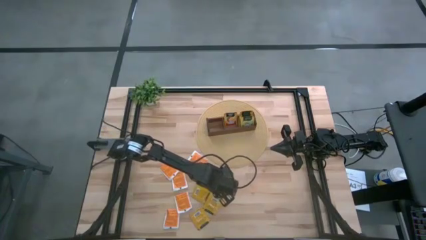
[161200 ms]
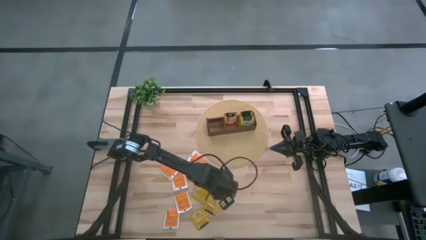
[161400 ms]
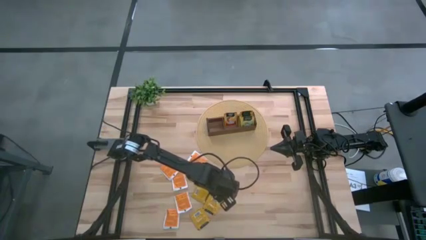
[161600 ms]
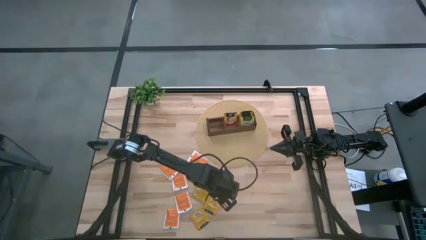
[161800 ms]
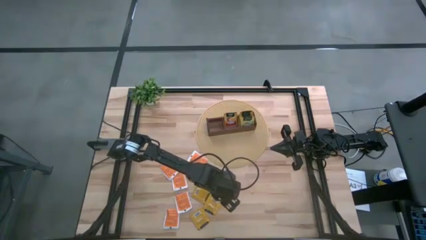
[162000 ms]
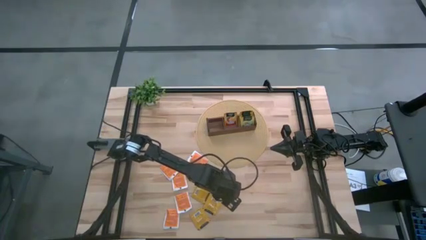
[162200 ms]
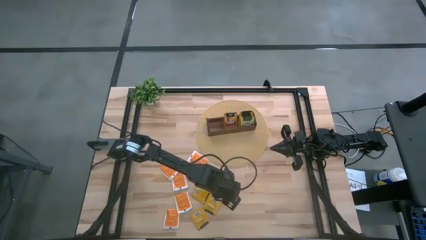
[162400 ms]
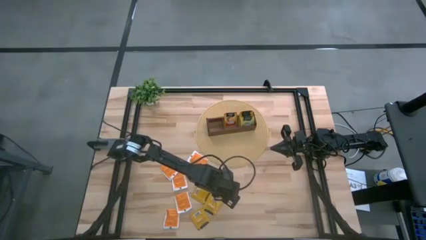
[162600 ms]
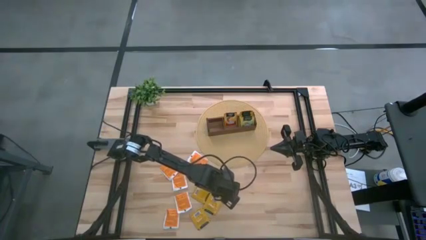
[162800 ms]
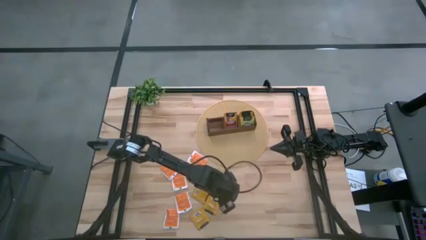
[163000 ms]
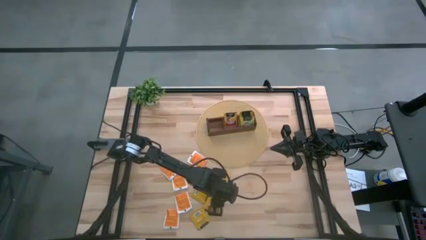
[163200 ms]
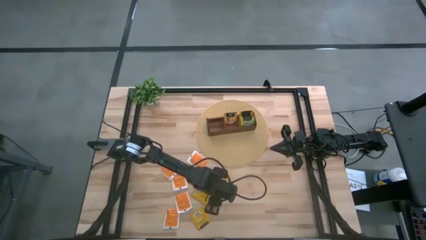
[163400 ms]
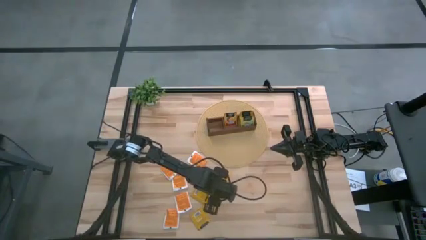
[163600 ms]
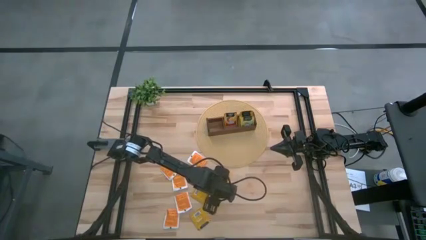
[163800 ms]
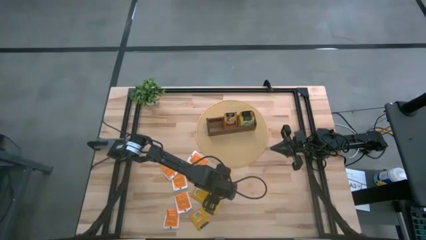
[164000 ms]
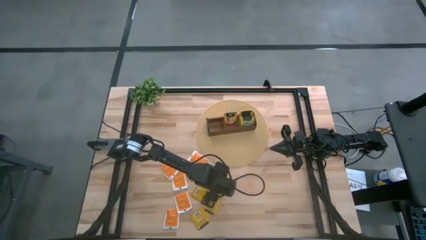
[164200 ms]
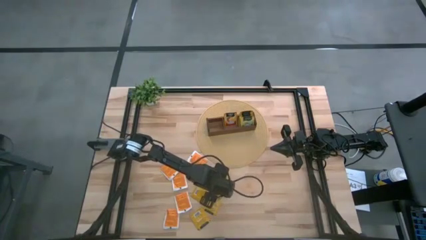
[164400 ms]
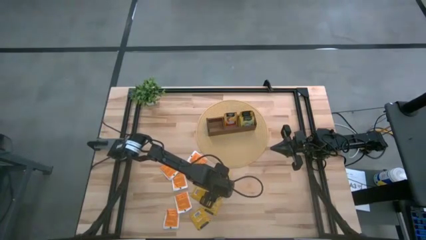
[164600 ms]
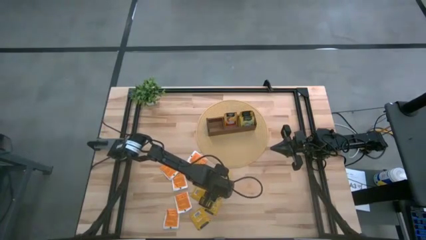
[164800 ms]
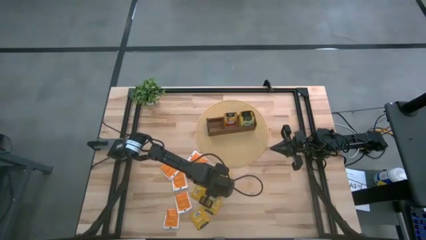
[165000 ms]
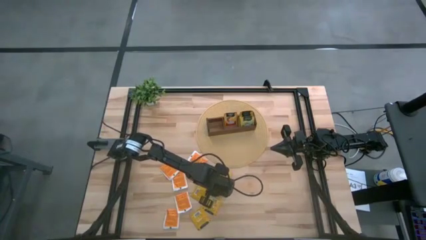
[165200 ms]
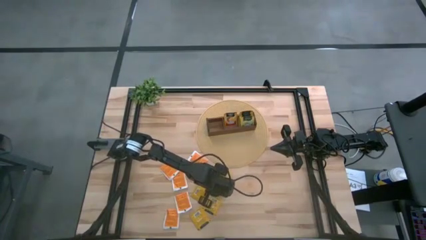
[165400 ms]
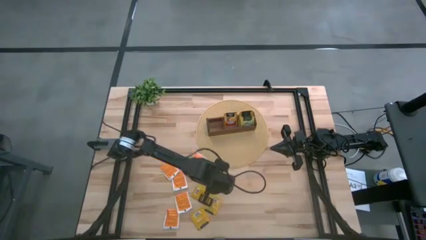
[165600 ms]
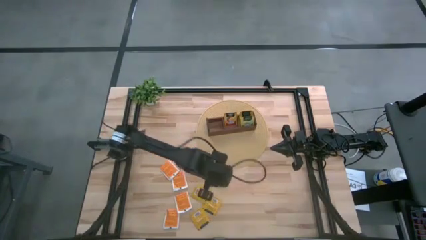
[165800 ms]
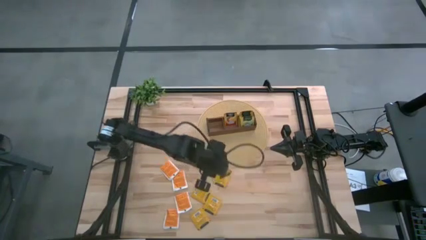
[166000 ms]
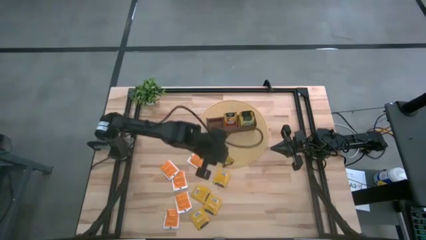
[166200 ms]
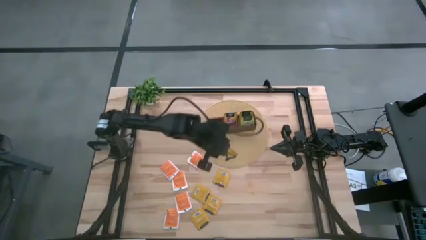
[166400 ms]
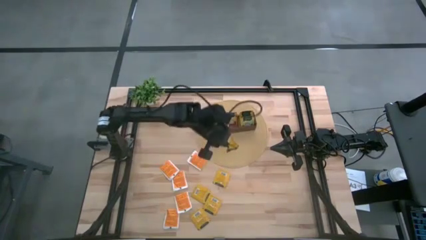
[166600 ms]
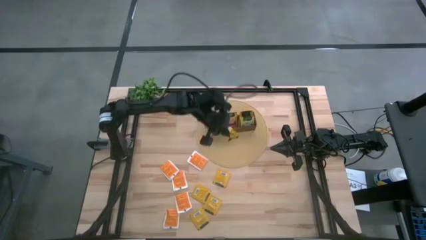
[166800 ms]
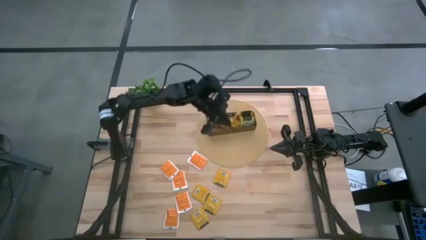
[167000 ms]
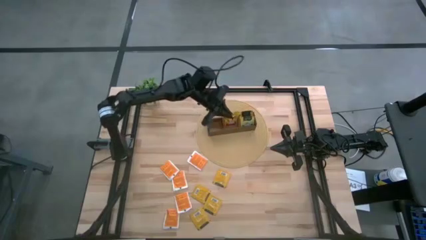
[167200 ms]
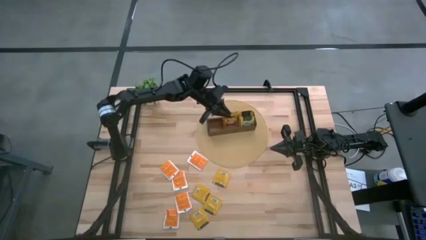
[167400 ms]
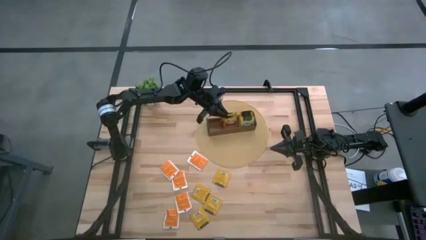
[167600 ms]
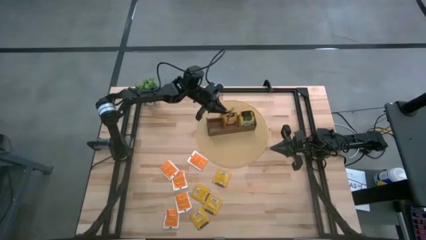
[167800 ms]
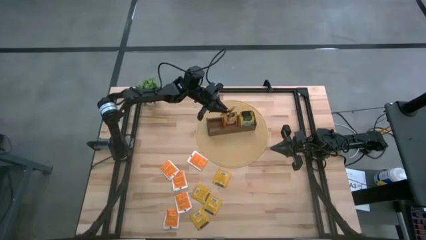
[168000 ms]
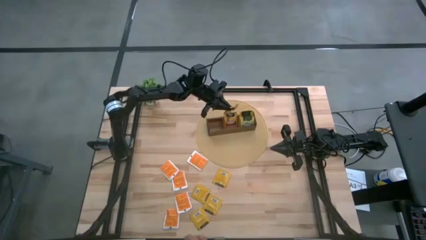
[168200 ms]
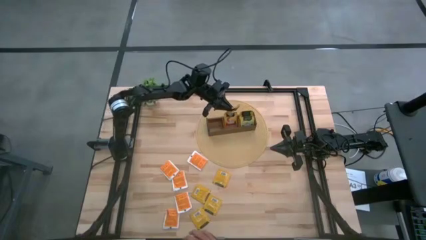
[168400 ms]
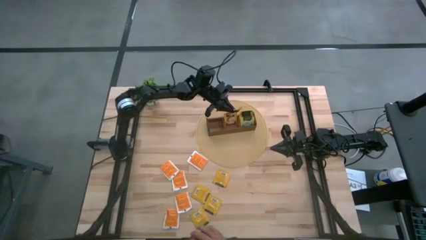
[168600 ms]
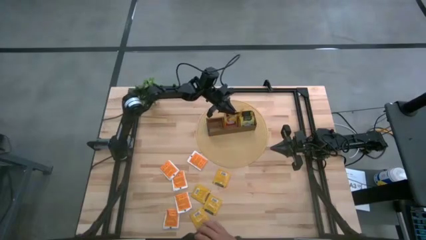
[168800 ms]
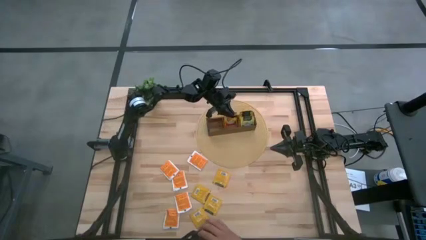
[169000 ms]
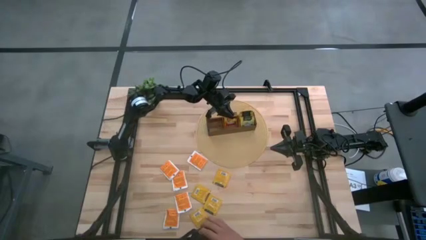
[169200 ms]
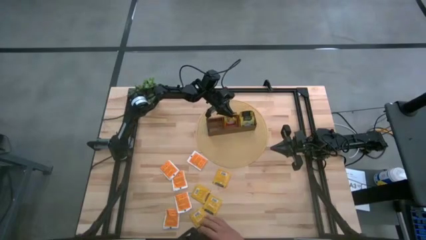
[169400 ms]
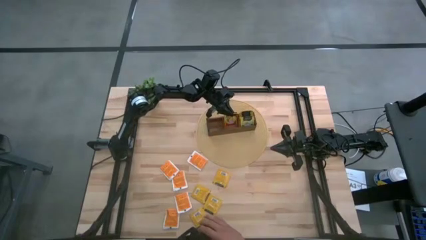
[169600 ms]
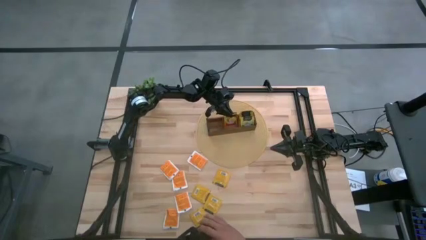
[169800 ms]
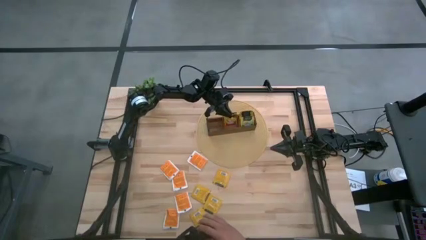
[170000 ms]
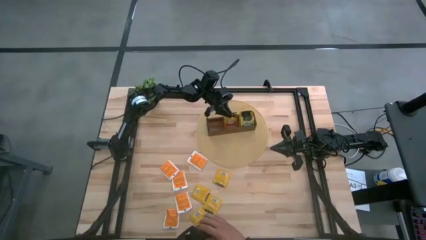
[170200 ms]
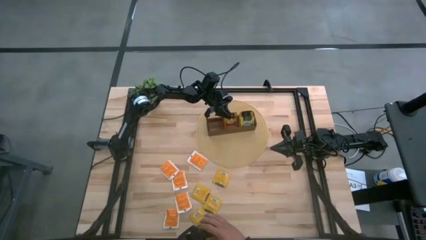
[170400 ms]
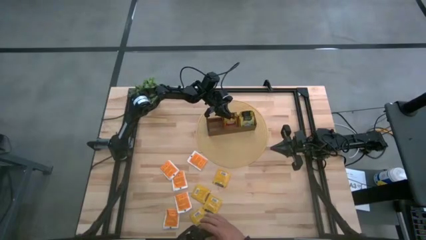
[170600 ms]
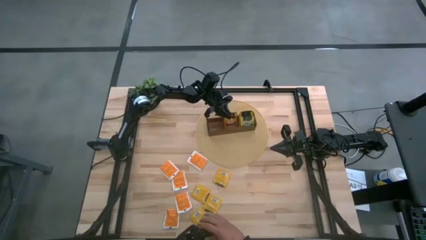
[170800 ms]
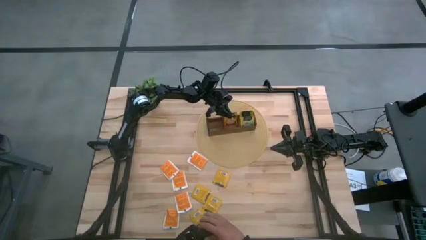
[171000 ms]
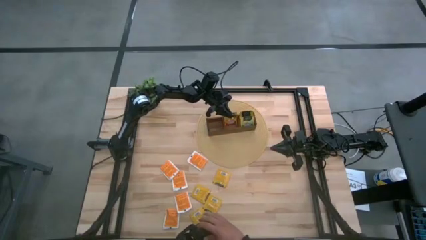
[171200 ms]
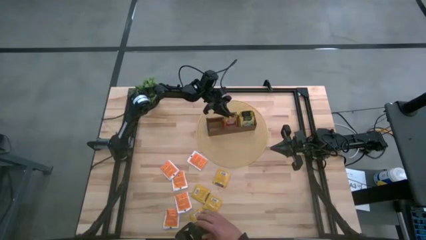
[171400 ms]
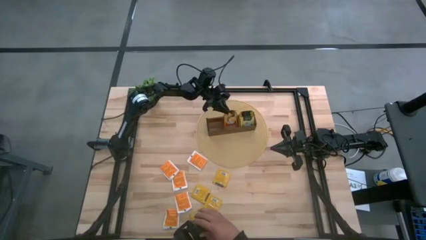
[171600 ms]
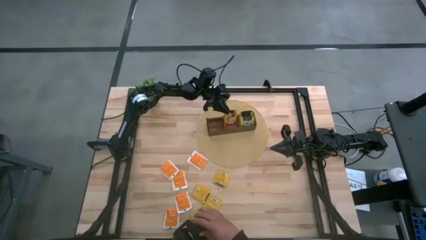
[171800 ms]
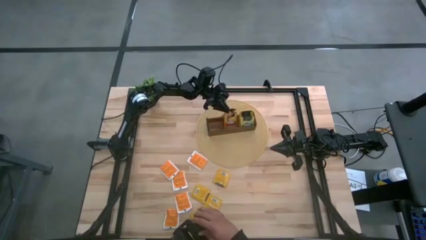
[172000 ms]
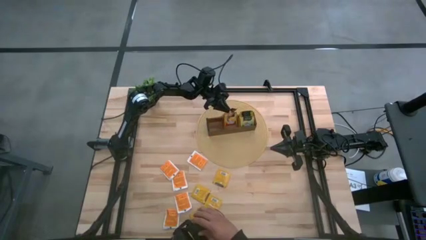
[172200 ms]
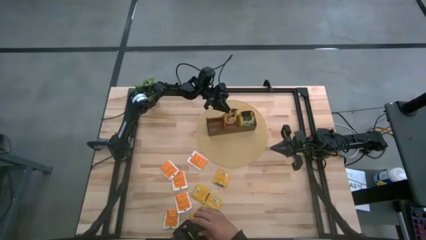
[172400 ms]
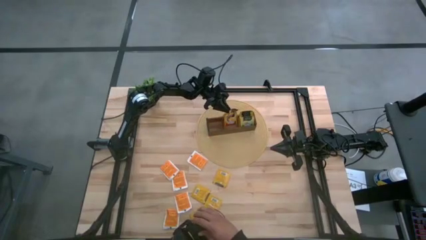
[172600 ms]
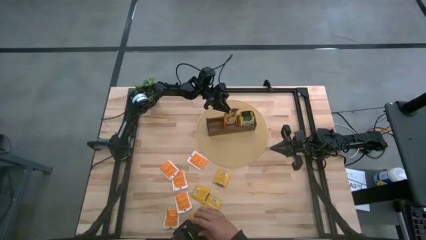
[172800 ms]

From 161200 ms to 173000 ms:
Task: Pick & Place Tea
Put the orange tea bag into the middle section of the wooden organizer

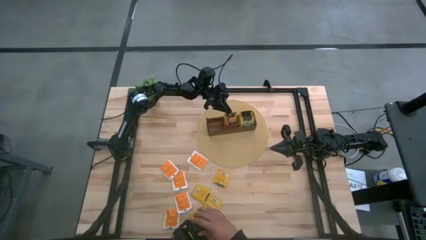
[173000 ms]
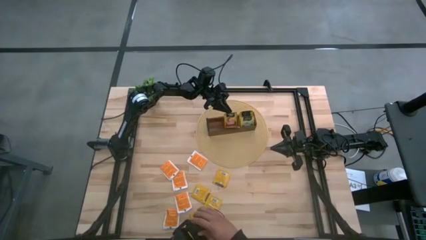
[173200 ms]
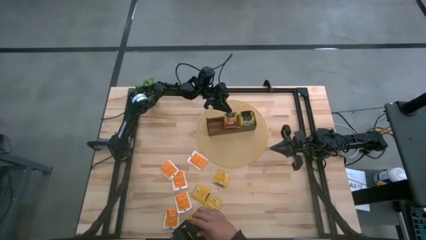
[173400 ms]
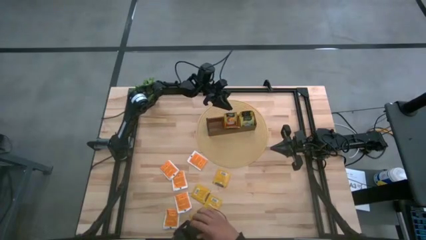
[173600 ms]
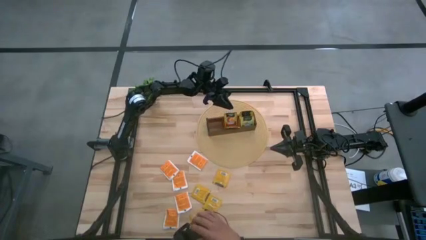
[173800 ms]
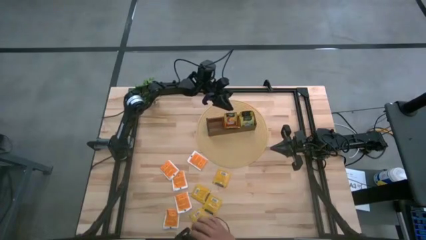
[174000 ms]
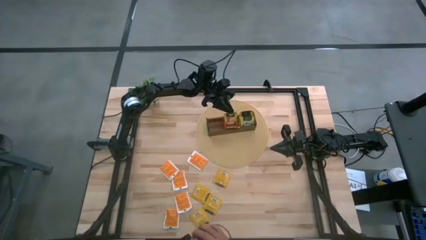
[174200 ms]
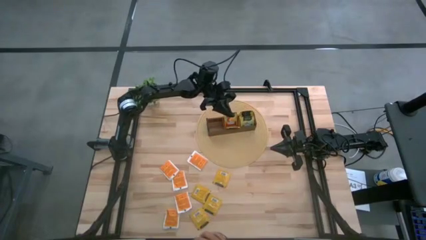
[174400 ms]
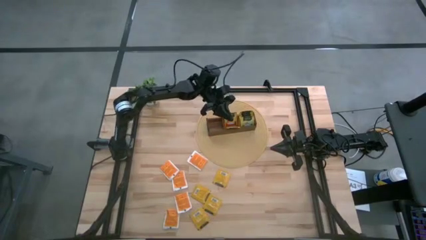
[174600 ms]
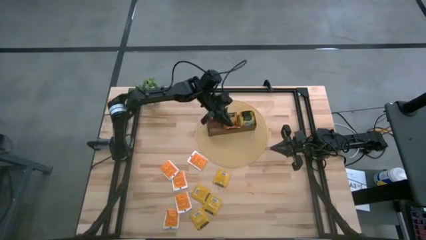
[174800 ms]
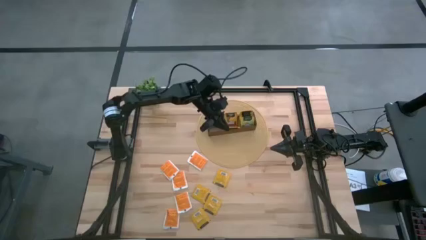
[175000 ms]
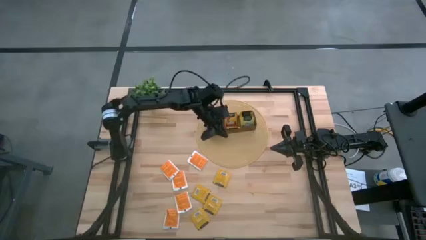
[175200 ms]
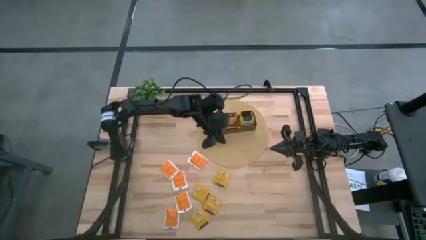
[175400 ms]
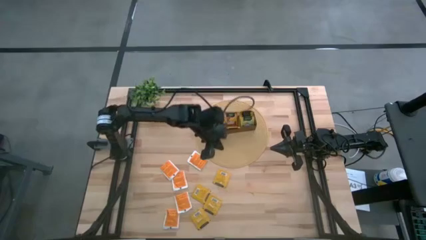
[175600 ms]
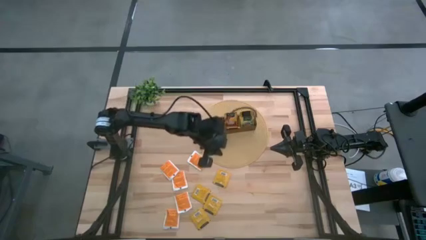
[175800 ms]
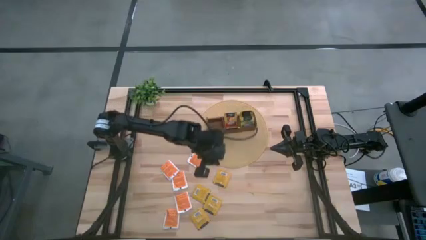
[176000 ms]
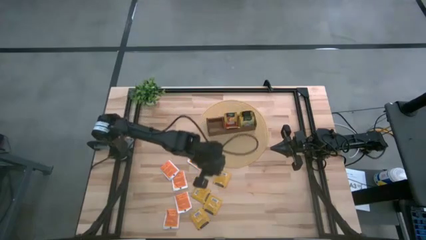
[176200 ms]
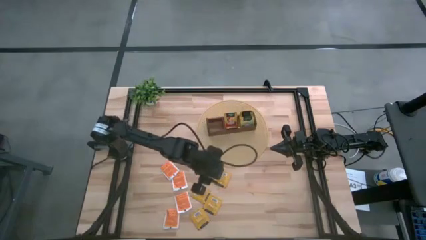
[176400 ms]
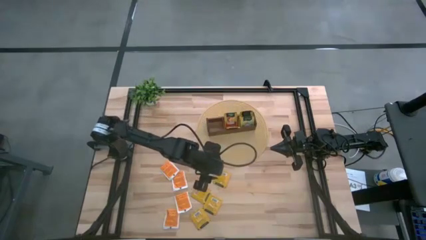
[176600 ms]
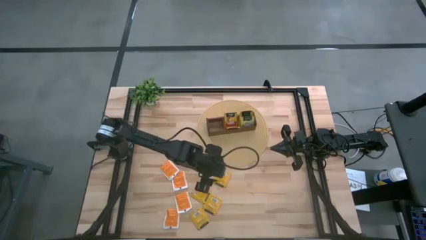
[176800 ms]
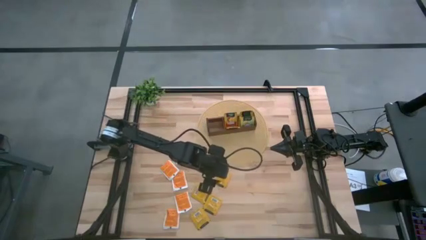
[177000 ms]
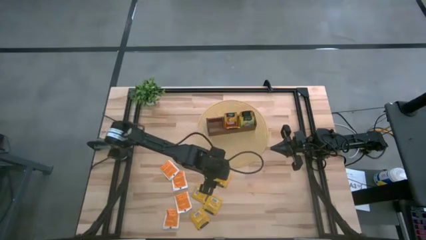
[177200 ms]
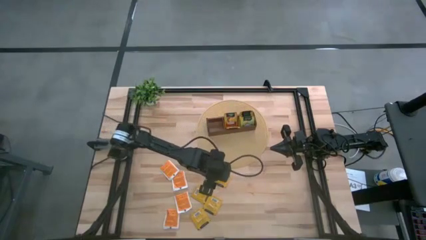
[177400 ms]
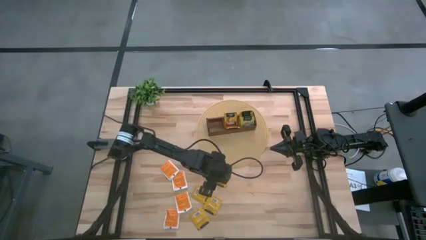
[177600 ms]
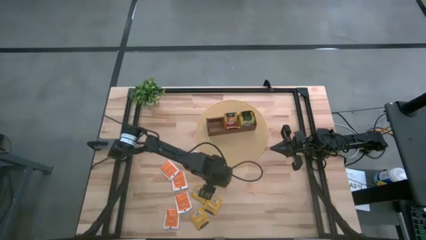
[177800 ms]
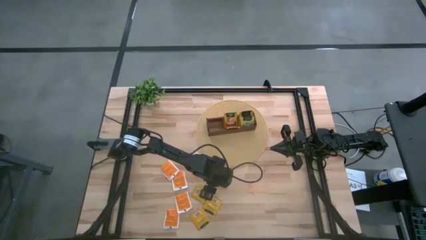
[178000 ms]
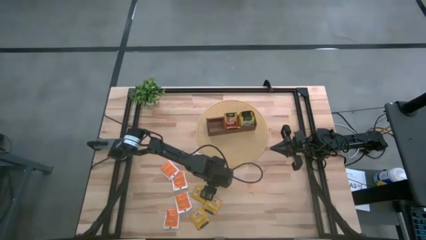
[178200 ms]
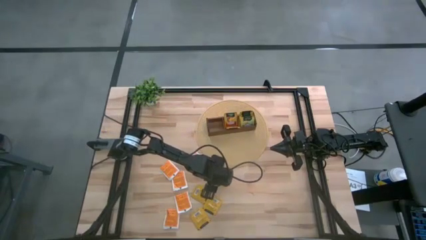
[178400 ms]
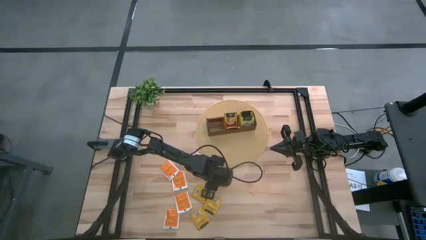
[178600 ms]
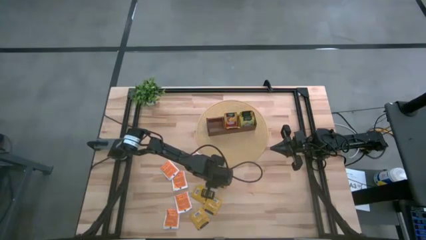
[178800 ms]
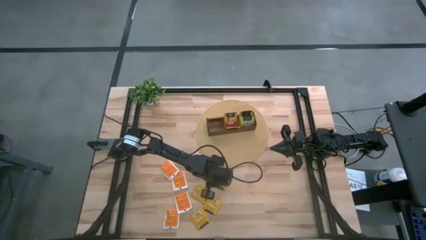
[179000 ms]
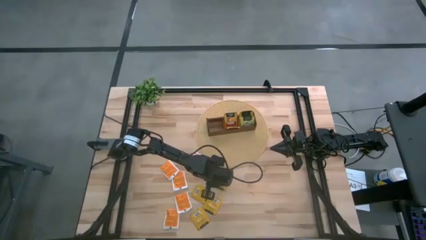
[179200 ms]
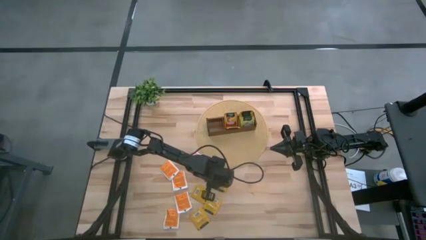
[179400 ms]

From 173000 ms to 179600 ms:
Put the orange tea bag into the middle section of the wooden organizer
